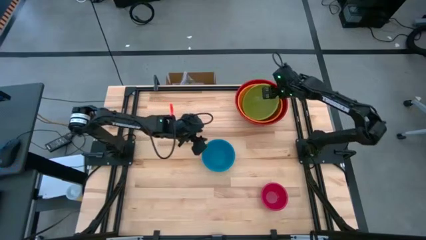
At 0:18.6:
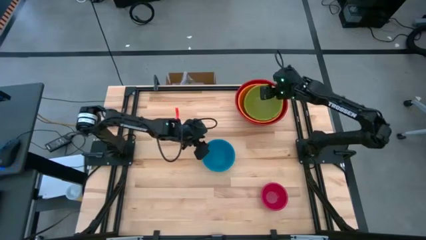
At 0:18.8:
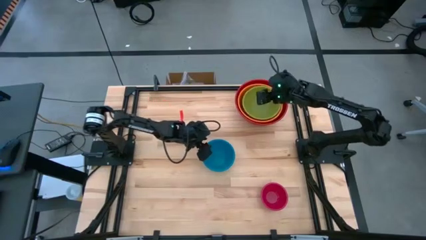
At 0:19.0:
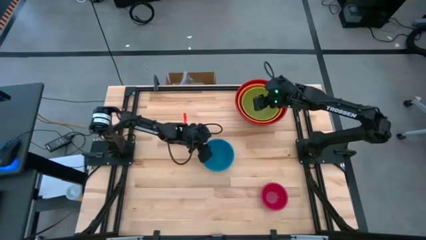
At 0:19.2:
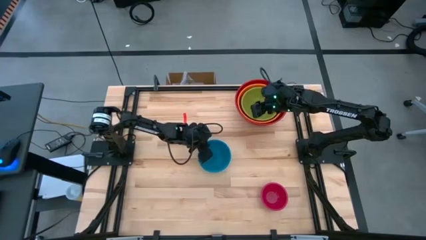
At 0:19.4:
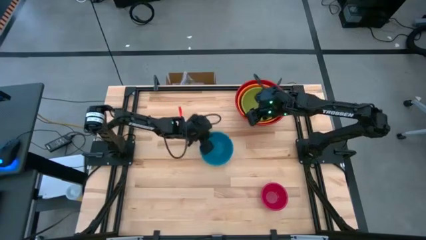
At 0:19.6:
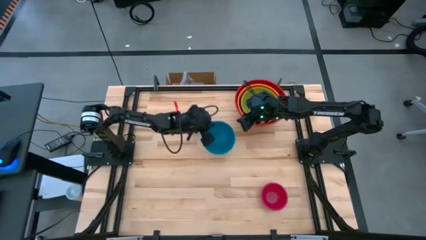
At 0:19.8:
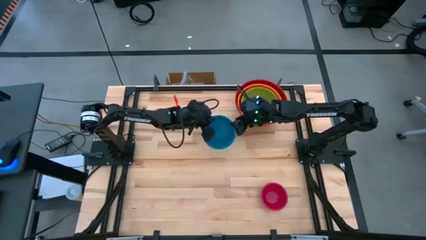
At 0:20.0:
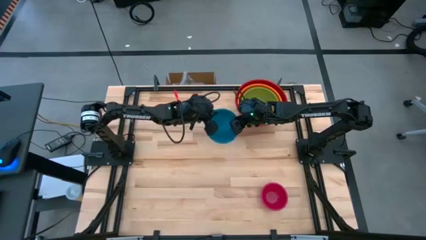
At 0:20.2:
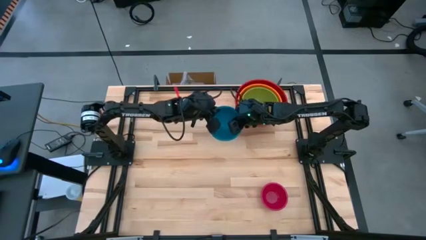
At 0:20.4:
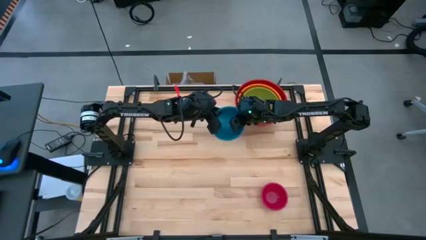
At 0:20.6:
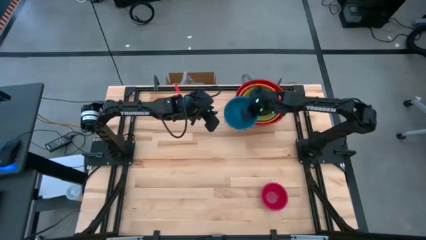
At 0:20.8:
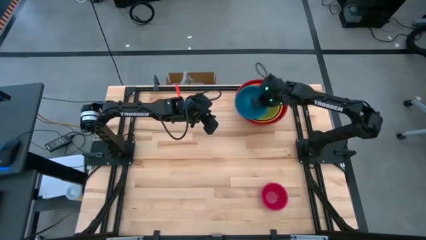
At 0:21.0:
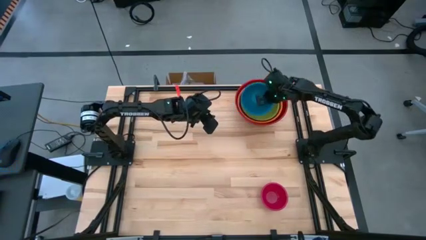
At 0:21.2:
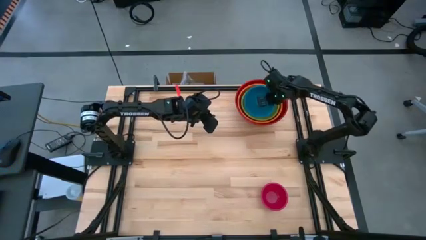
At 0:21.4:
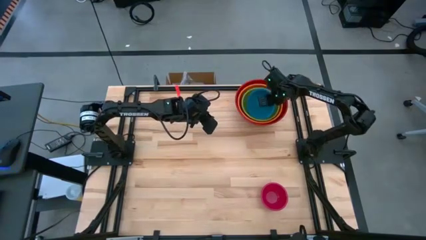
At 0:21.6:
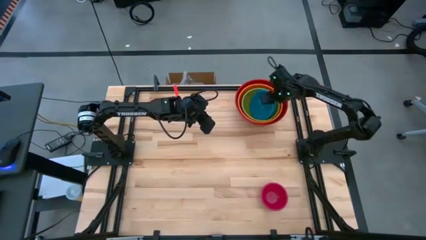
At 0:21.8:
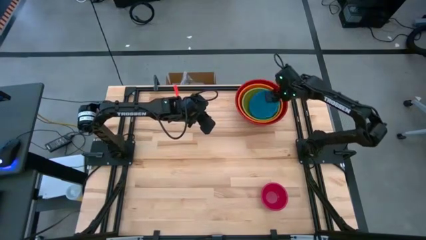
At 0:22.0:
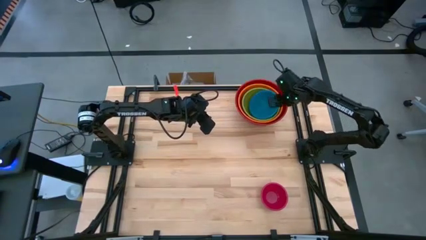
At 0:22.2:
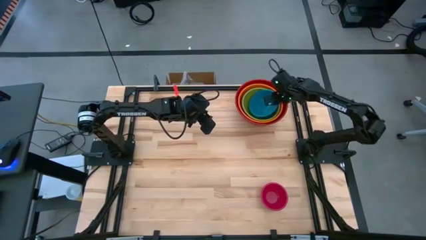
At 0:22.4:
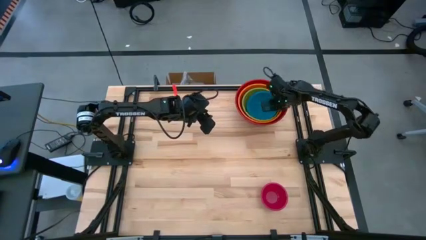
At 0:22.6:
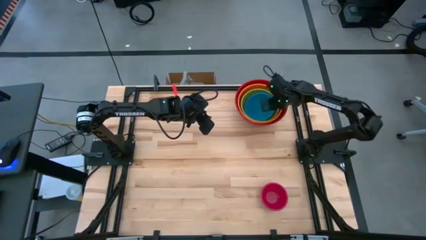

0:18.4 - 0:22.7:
Stack the blue bowl on top of the green bowl

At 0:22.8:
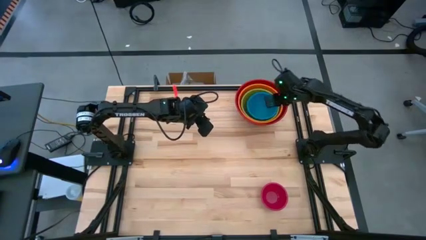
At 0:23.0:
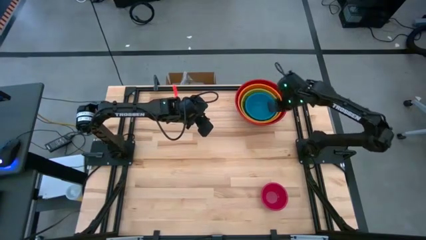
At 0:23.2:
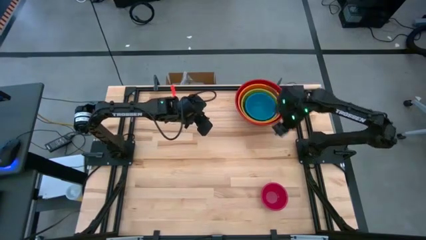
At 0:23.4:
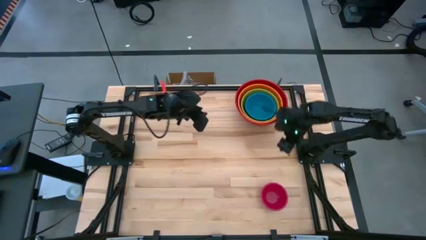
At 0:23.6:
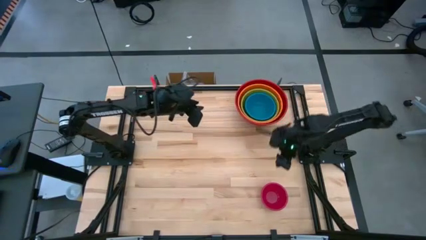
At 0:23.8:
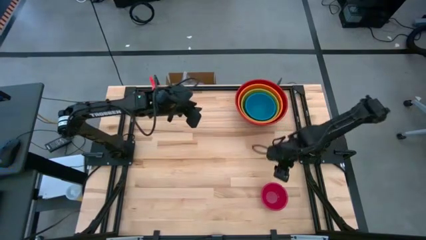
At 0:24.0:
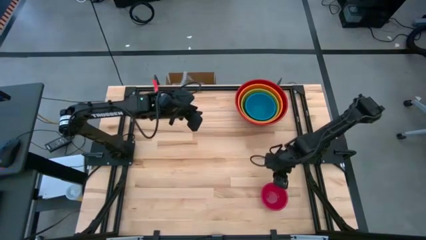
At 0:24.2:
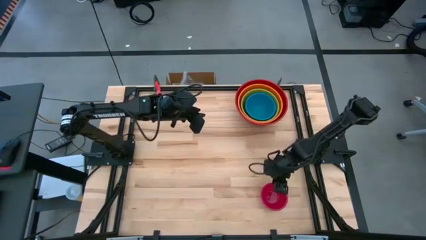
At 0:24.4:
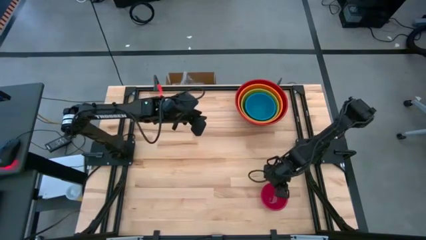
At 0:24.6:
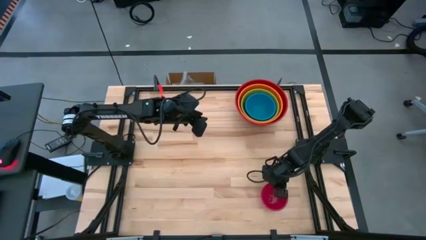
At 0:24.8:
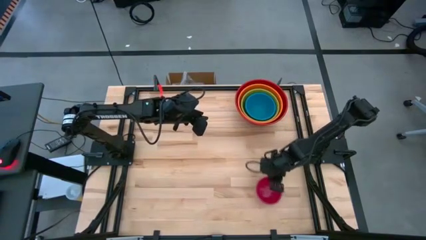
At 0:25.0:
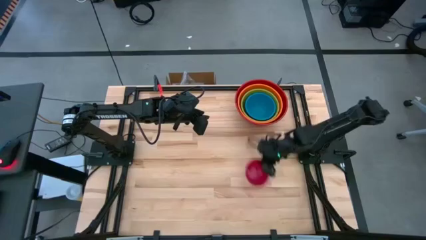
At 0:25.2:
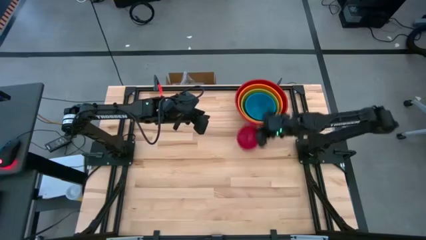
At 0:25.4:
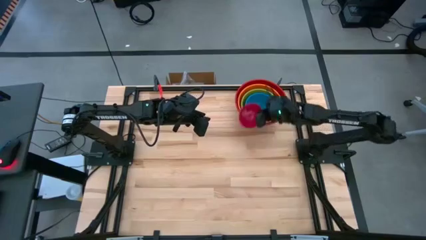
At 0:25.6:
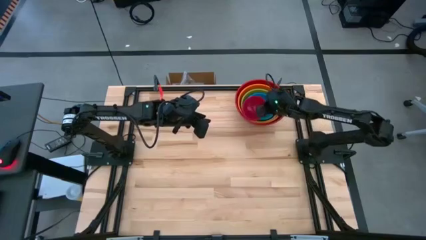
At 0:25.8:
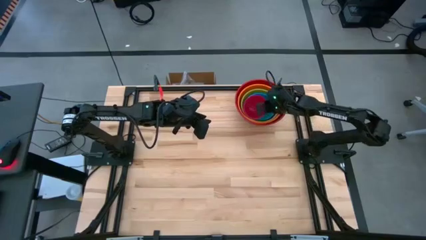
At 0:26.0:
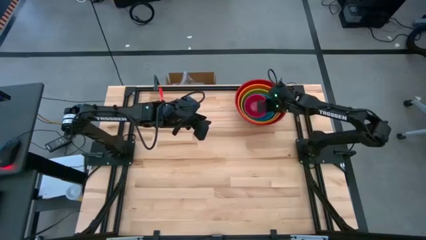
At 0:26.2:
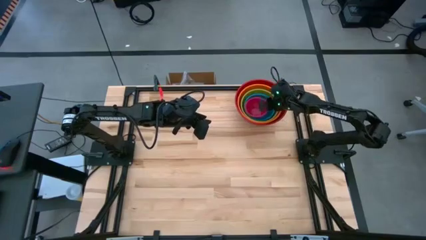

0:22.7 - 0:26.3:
Stack the red bowl on top of the blue bowl in the table

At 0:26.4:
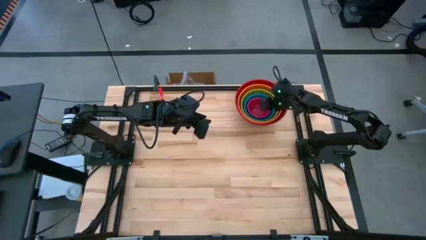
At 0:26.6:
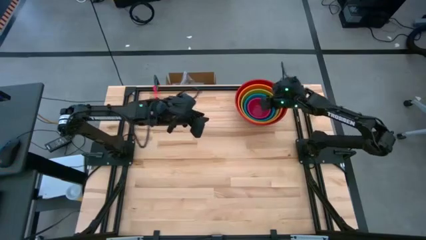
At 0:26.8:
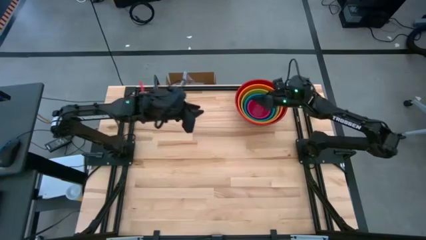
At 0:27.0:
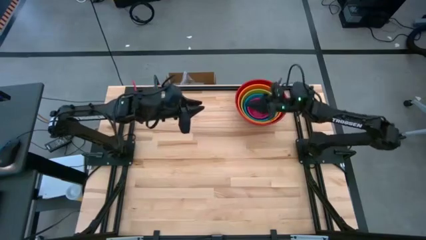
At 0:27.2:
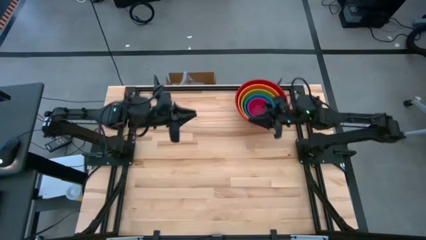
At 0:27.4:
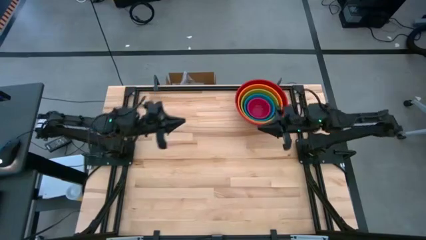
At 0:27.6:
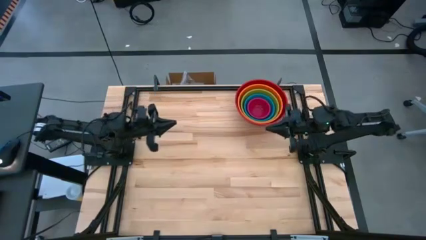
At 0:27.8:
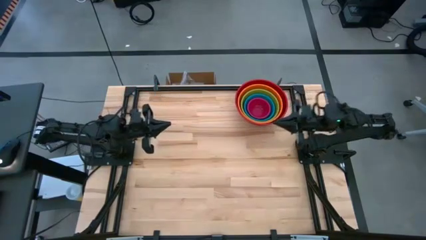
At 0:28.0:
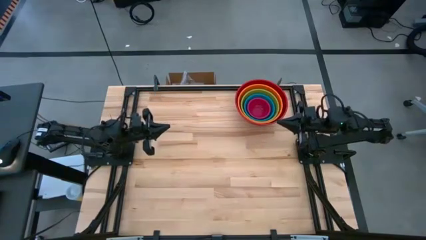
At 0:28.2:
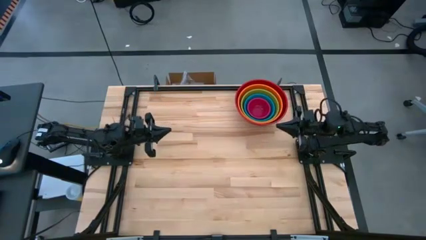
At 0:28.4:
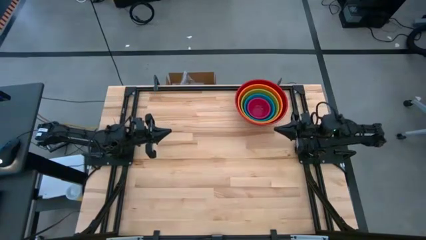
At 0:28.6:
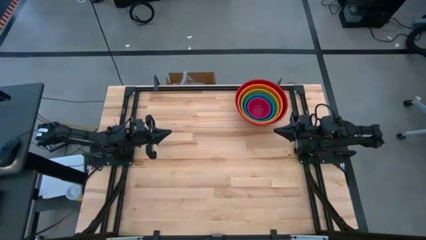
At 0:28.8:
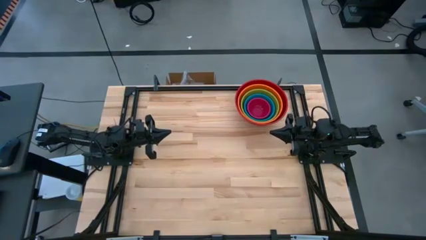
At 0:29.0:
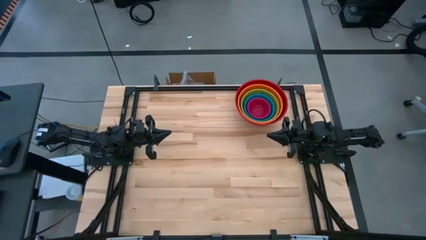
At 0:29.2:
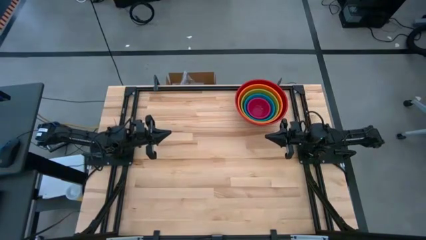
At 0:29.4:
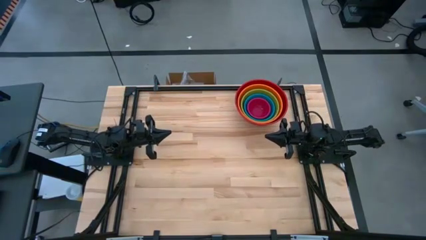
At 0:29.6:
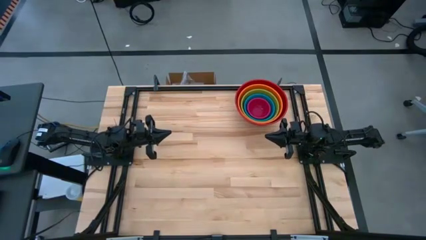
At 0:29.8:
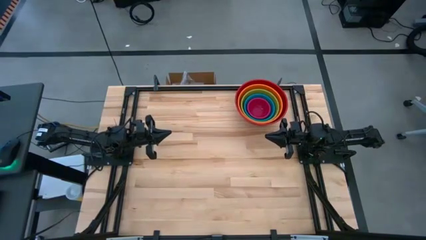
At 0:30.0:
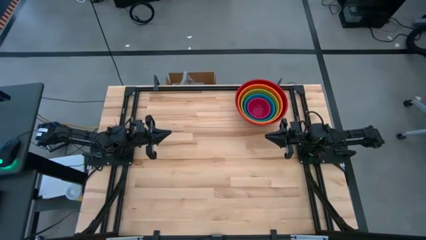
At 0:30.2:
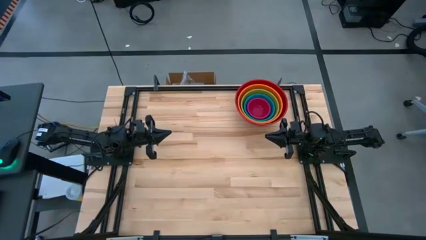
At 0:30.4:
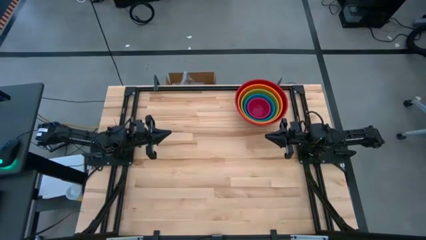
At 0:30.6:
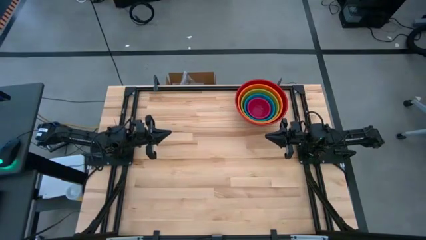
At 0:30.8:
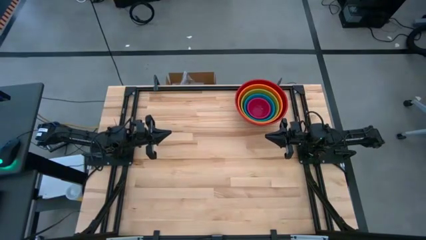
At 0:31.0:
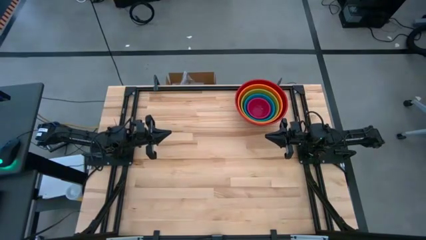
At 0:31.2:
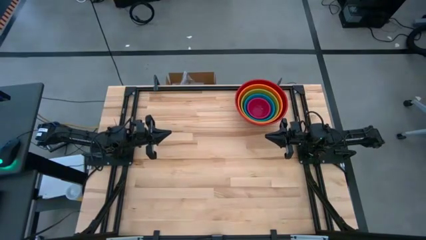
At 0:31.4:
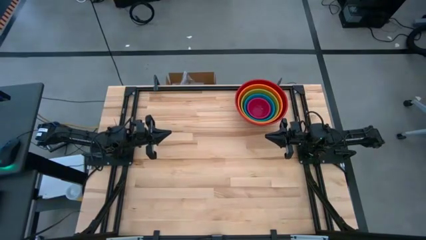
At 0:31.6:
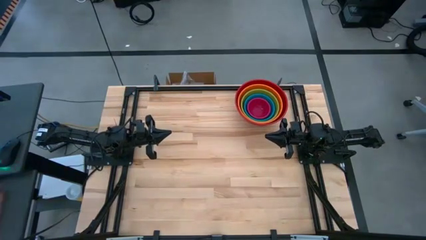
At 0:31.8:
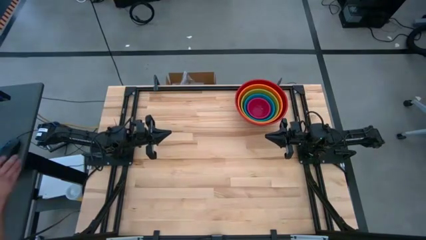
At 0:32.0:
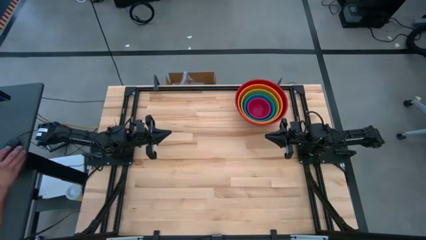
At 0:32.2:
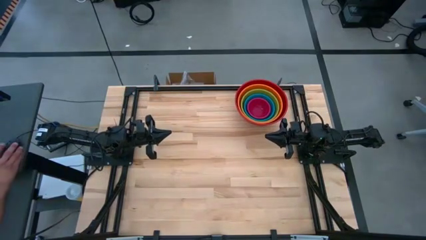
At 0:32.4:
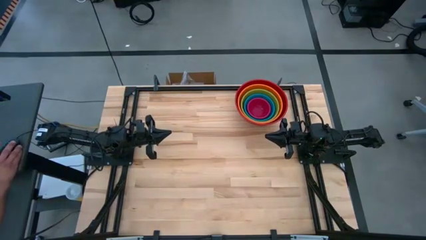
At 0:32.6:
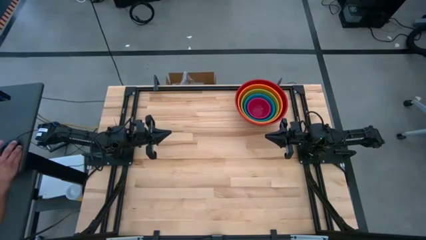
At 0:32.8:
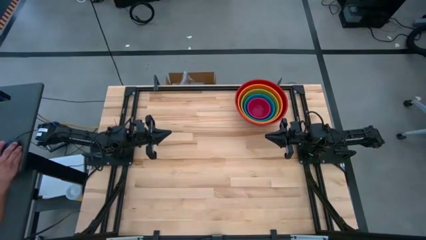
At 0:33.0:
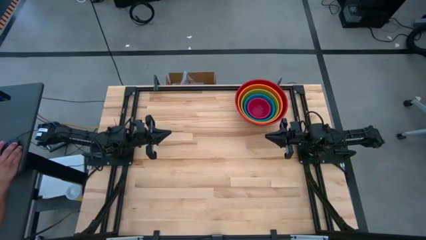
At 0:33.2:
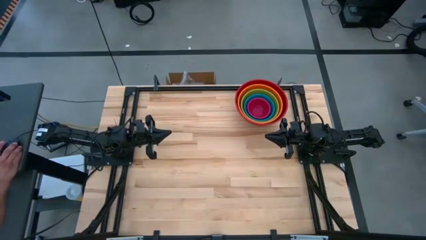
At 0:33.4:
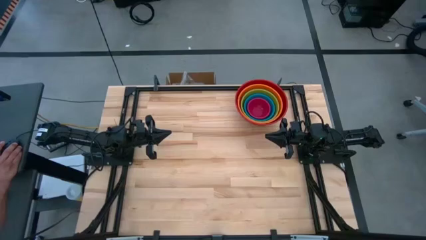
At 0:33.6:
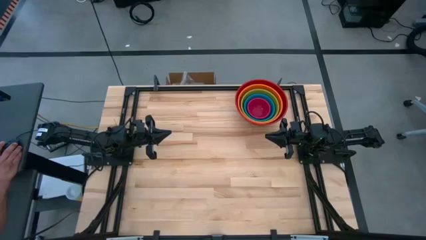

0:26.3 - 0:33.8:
Return to Home Position
